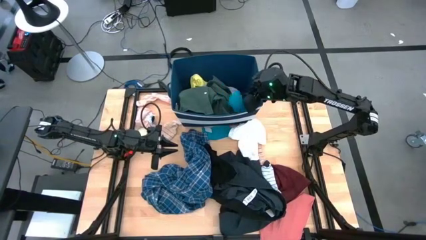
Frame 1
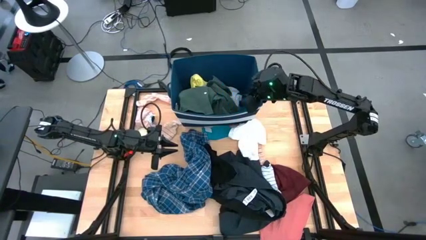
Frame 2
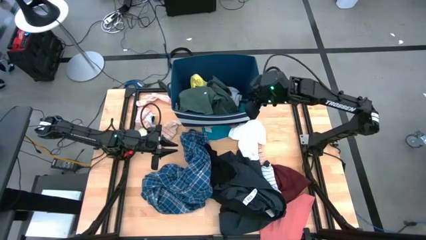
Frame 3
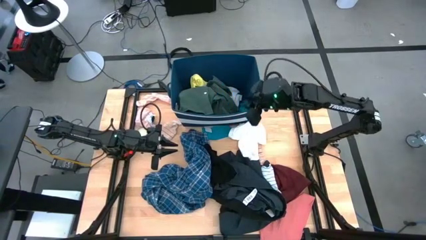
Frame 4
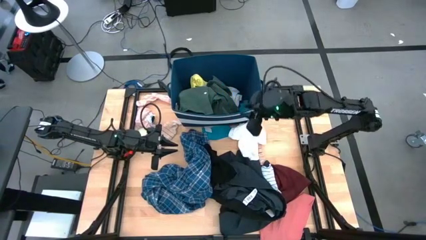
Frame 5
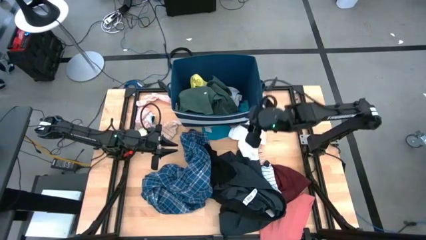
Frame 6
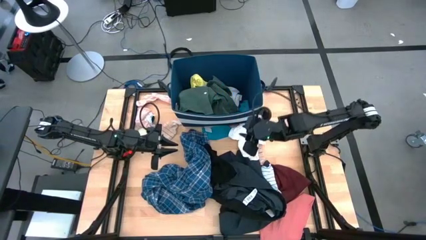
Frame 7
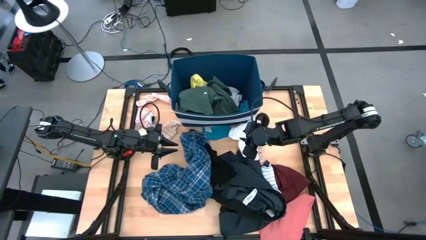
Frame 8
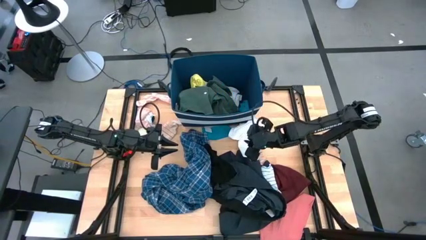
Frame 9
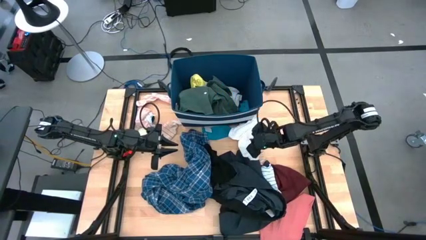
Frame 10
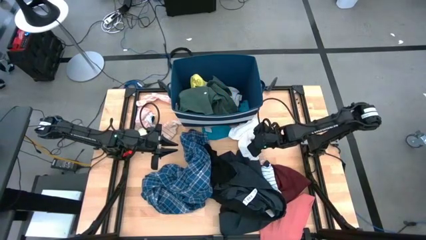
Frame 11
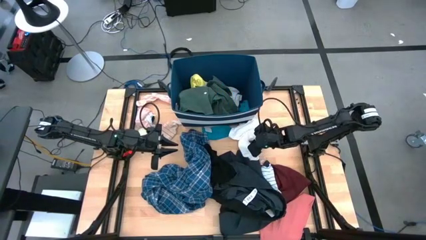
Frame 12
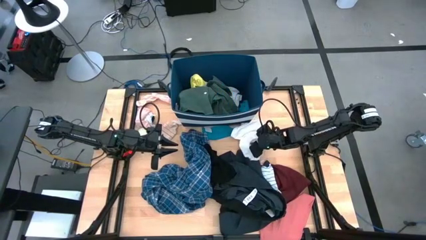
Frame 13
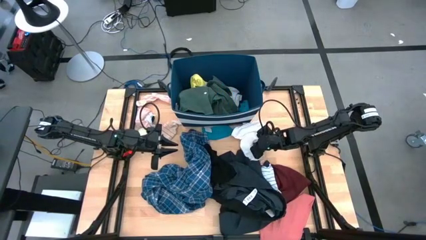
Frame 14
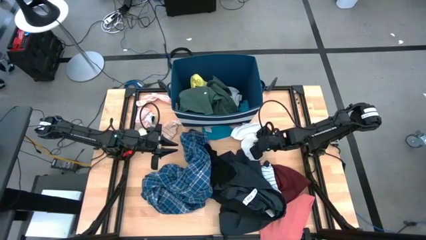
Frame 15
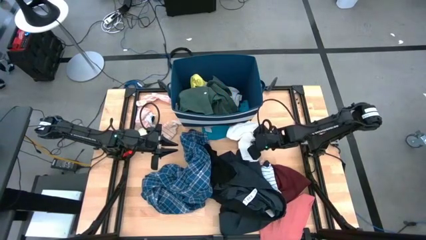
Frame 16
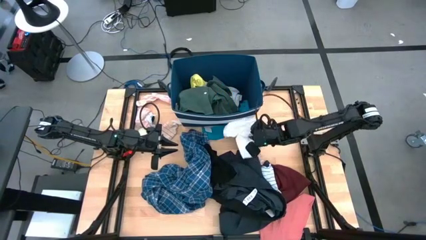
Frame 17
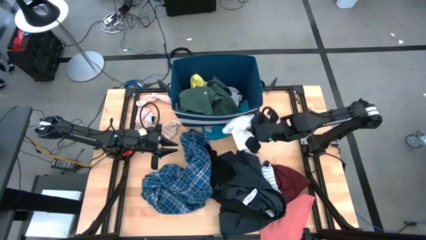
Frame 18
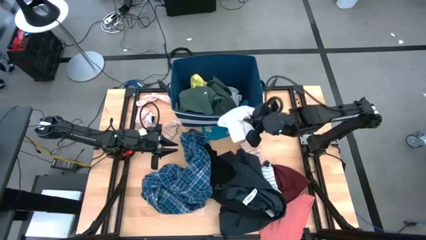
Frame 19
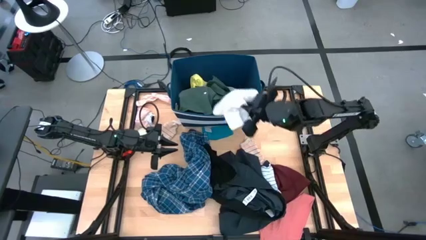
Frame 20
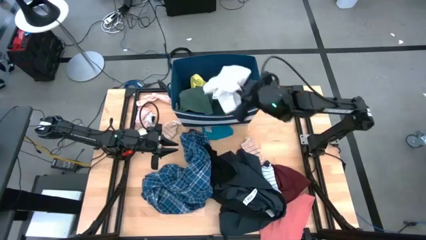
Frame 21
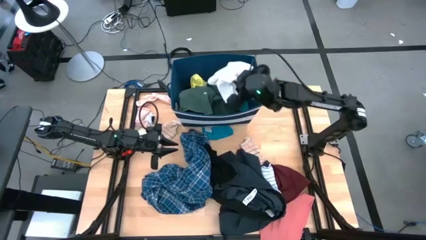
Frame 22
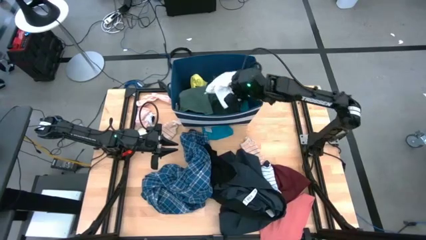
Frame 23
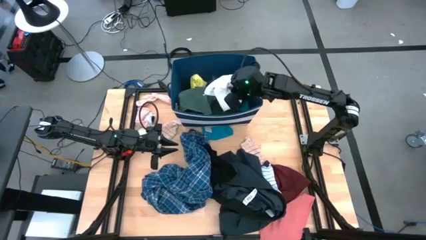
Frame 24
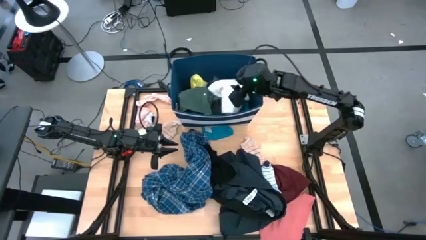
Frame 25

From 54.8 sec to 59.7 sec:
Task: Sort clothes
Put the white short into the laundry organizer

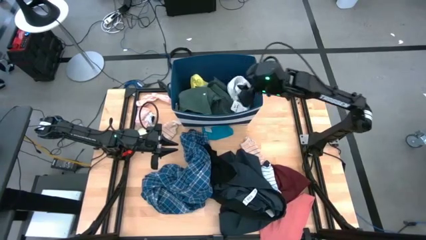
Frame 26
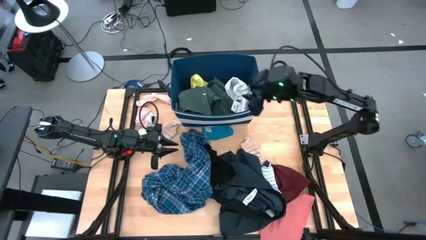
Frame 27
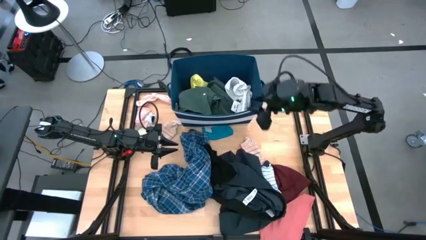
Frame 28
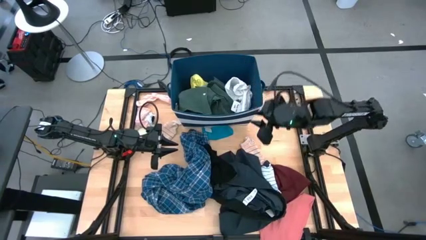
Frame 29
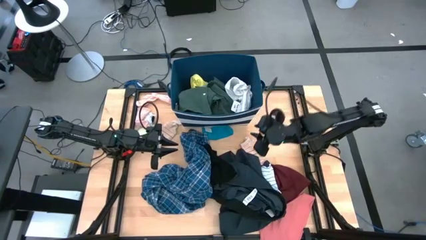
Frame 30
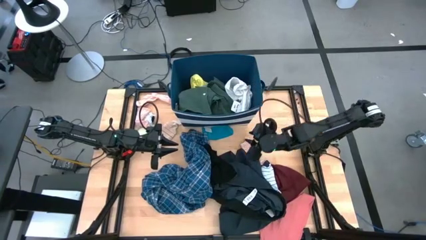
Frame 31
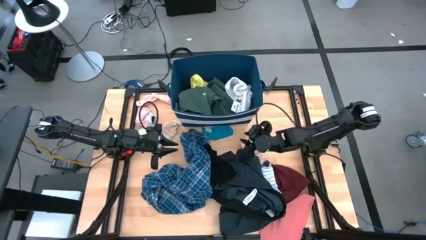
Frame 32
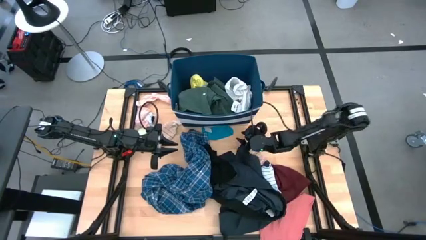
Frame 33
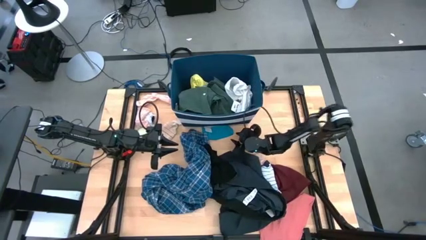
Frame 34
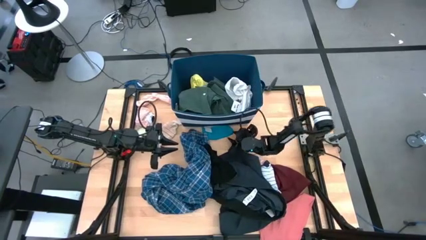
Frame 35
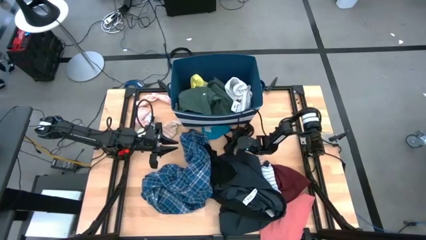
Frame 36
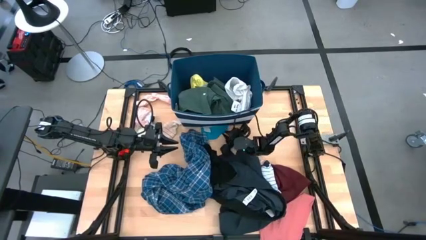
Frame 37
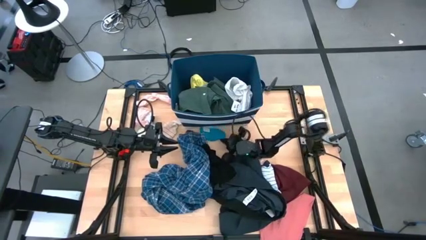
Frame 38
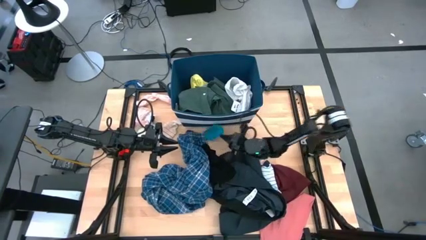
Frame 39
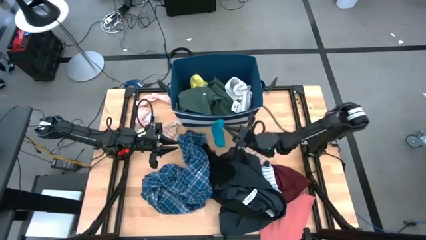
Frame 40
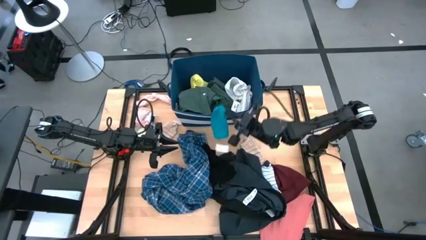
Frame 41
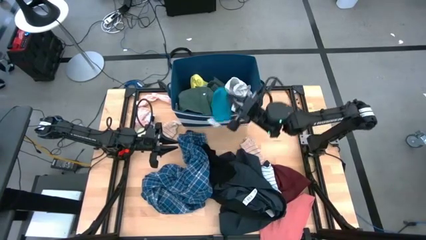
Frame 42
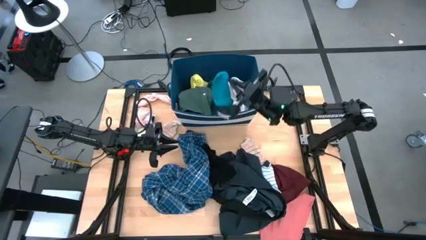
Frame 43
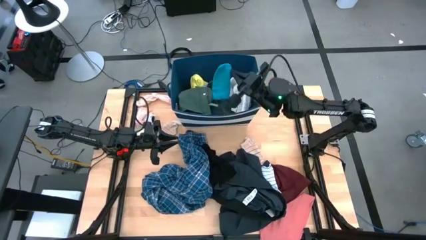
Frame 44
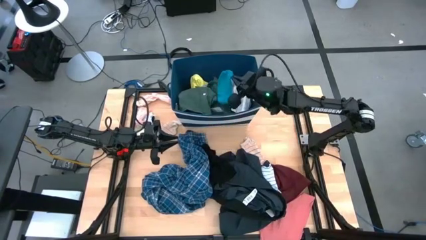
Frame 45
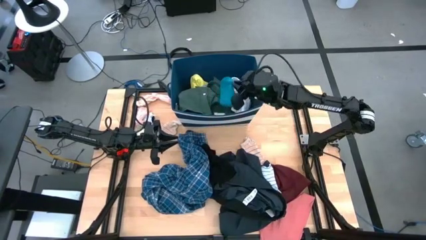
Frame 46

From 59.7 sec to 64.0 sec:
Put the blue sock into the laundry organizer
